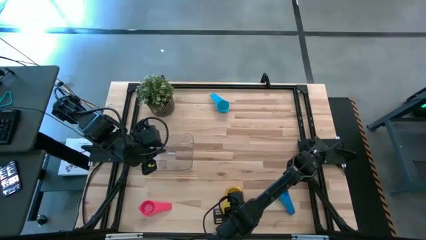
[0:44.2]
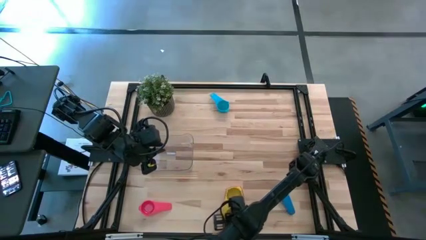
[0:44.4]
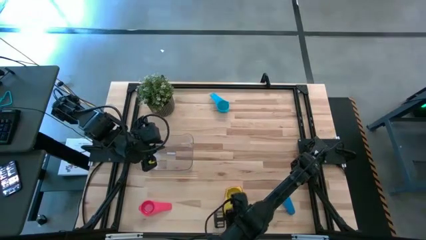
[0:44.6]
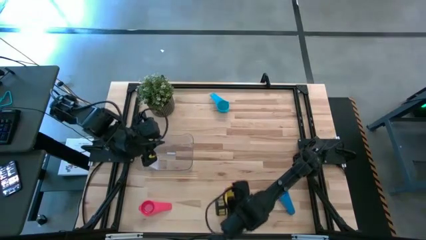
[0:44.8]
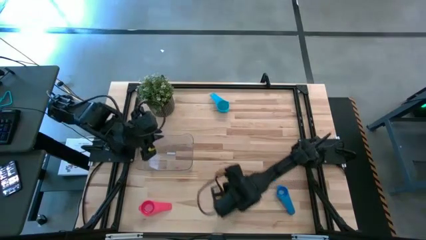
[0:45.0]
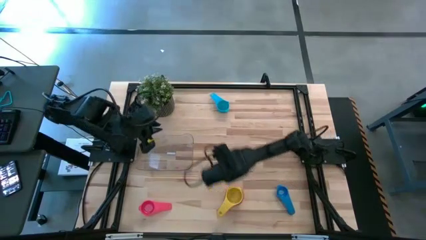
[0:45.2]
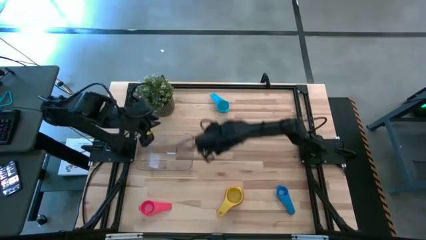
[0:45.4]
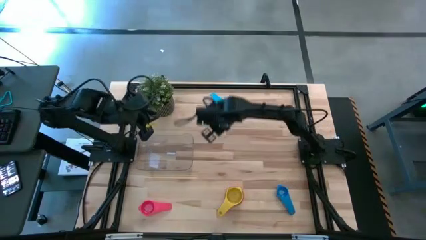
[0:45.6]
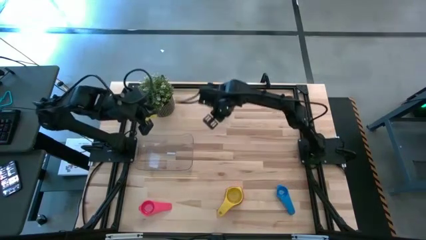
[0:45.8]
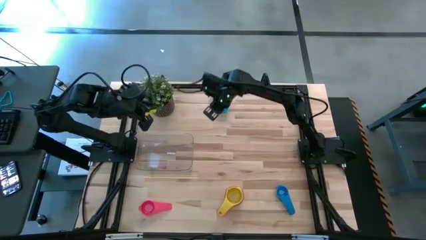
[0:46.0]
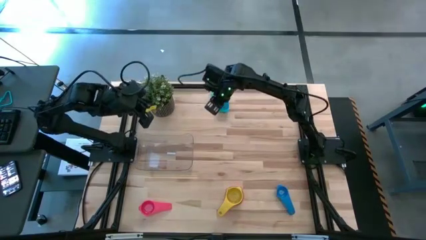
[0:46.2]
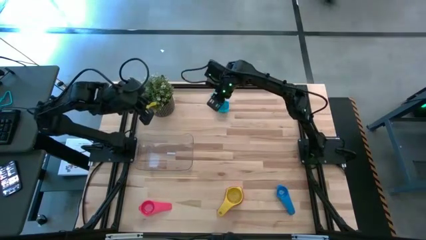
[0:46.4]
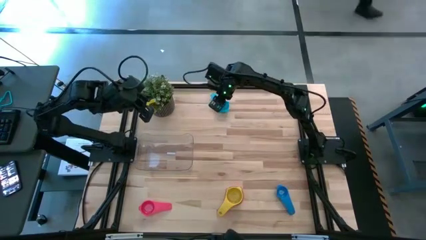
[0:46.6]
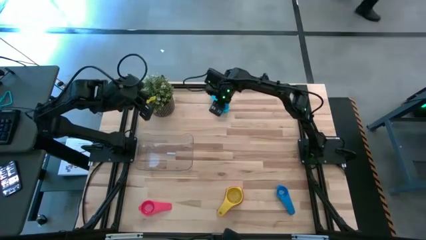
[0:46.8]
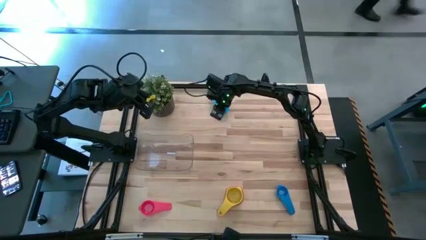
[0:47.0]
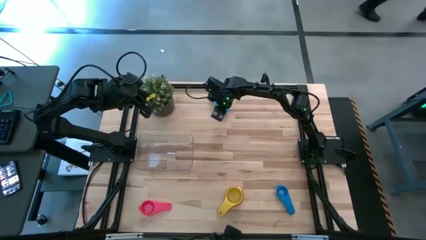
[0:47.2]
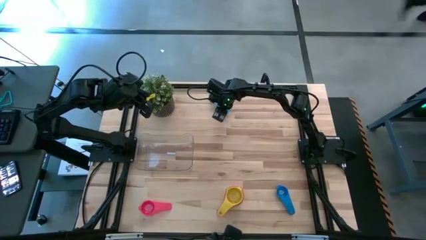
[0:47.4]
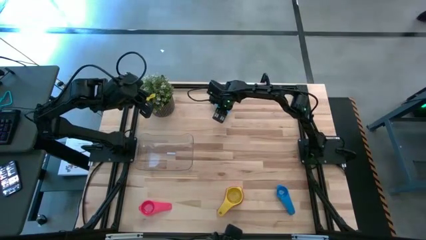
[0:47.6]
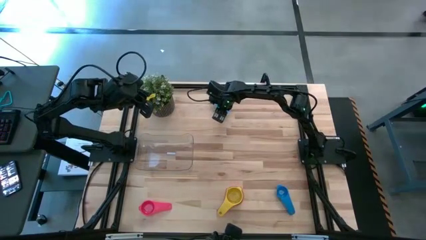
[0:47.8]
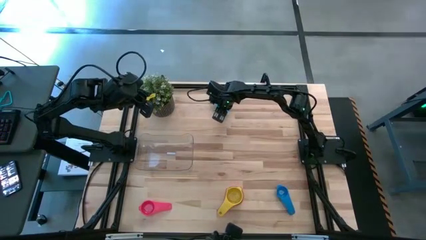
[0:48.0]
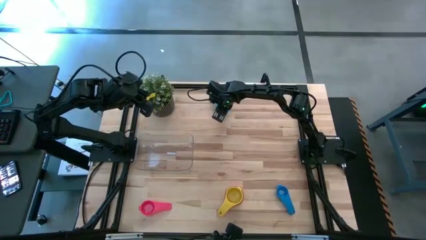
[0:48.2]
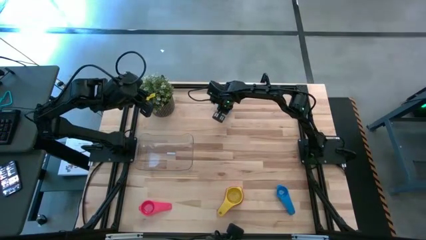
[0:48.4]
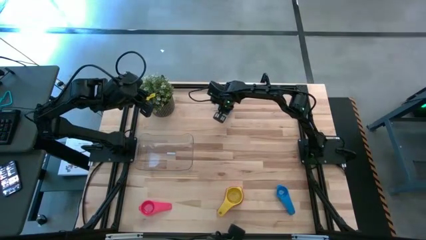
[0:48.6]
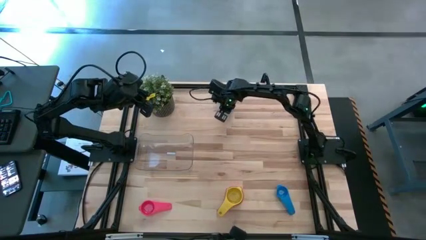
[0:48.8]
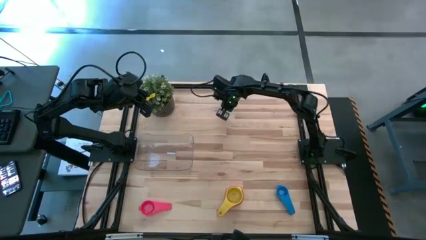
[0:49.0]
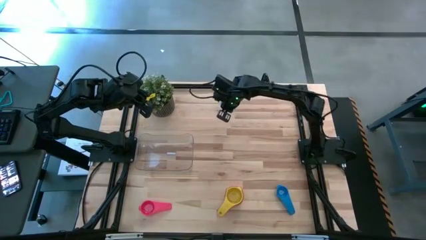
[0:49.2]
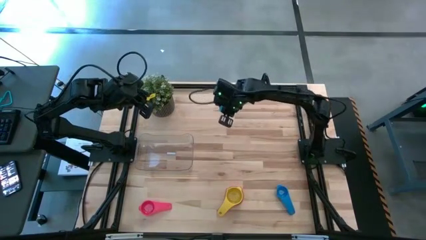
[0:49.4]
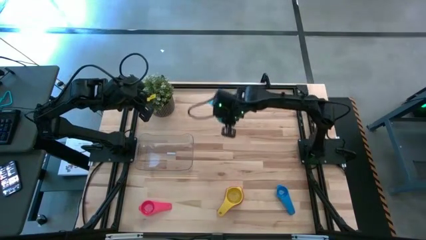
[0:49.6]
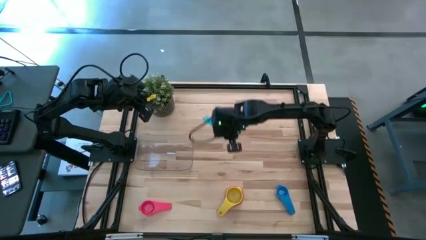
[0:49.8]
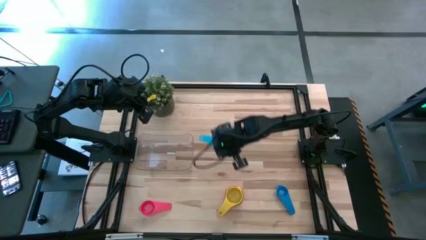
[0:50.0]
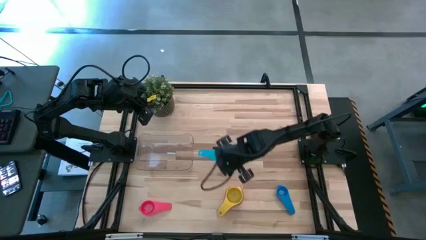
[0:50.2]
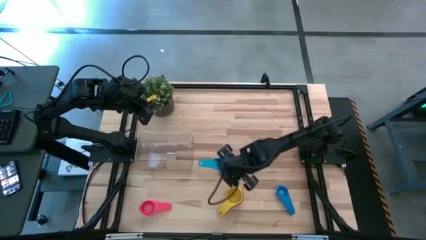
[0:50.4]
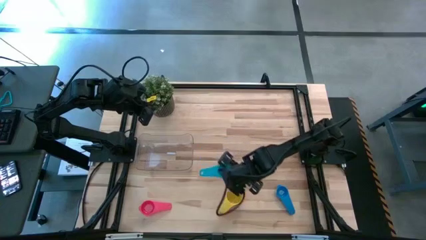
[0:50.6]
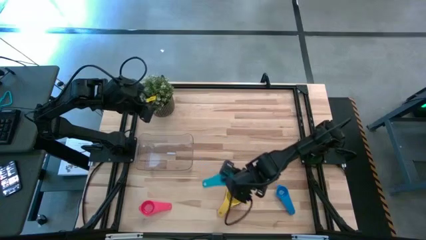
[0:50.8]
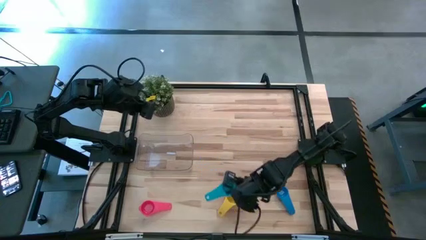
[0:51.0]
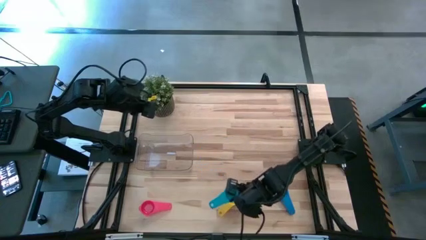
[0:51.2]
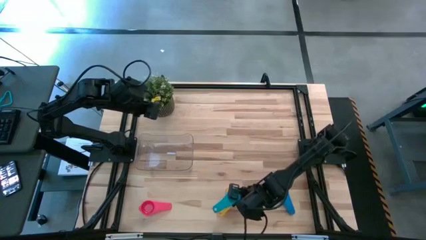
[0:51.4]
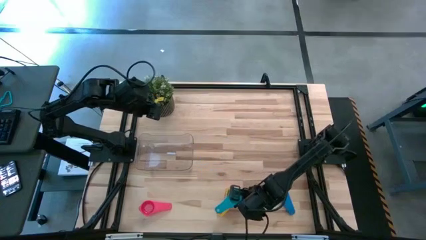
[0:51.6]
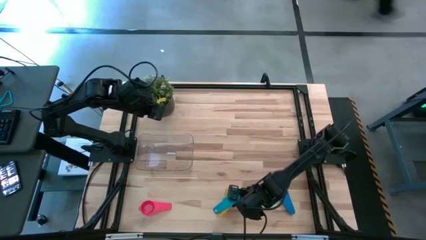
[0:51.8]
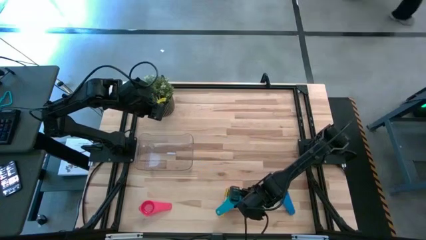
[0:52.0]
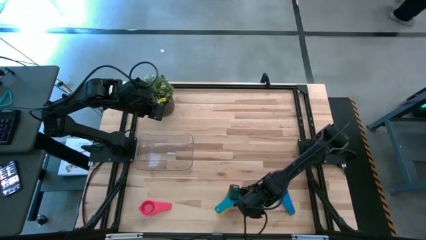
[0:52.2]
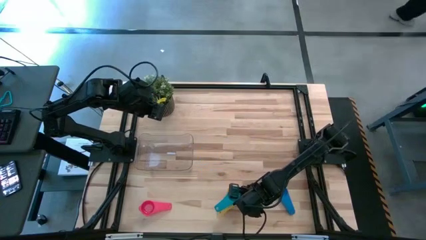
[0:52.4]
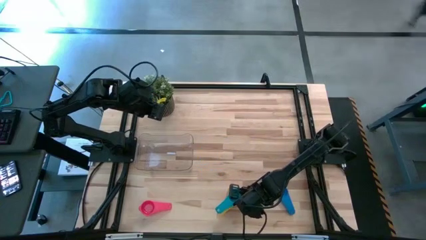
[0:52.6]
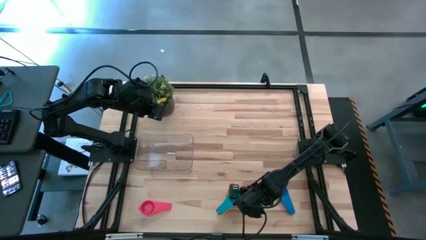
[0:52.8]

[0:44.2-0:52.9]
Task: Nest measuring cups in basket
Stack the light blue measuring cup on top of the yellow measuring cup

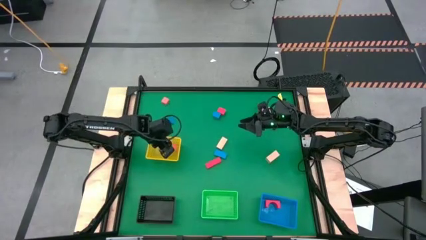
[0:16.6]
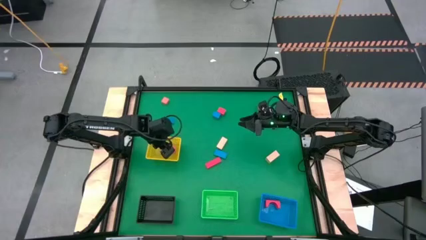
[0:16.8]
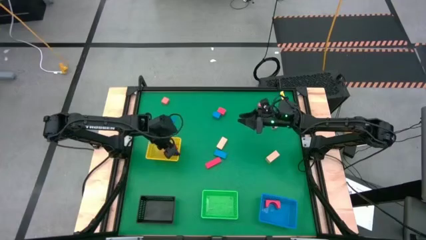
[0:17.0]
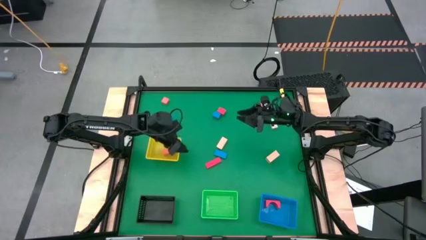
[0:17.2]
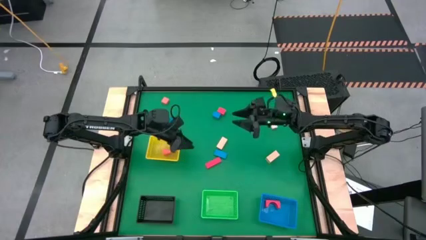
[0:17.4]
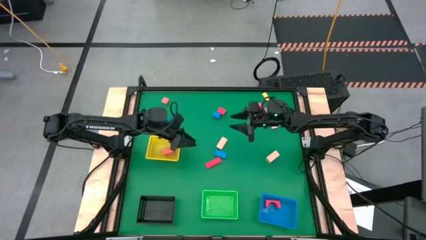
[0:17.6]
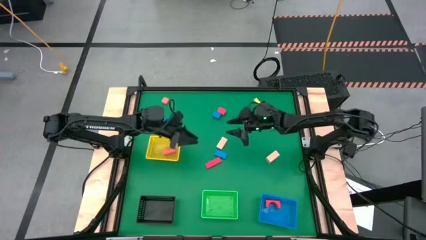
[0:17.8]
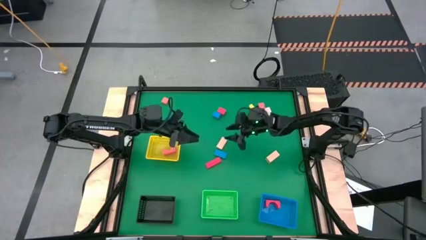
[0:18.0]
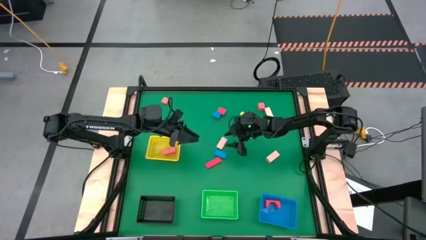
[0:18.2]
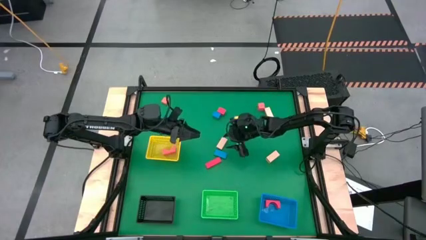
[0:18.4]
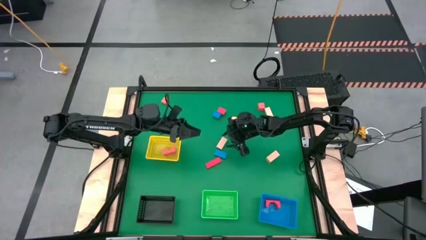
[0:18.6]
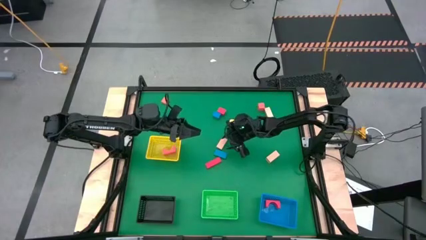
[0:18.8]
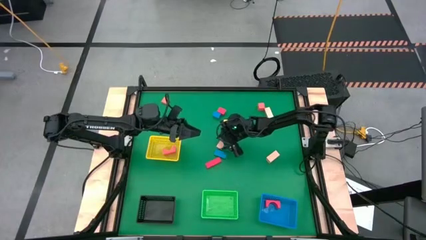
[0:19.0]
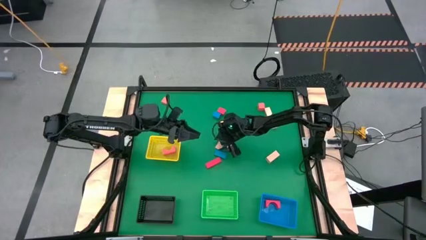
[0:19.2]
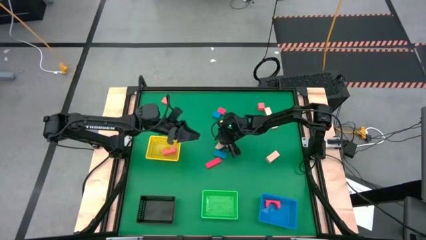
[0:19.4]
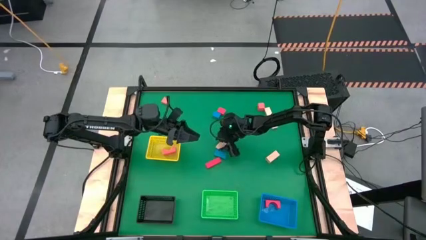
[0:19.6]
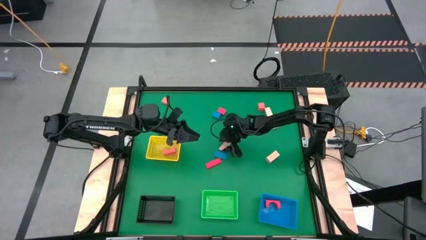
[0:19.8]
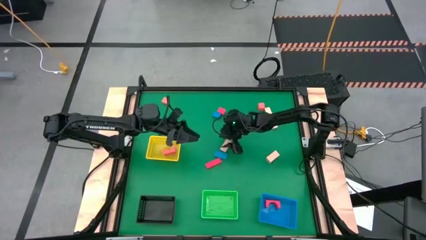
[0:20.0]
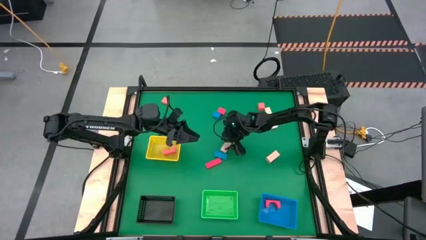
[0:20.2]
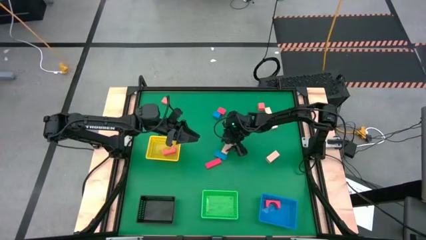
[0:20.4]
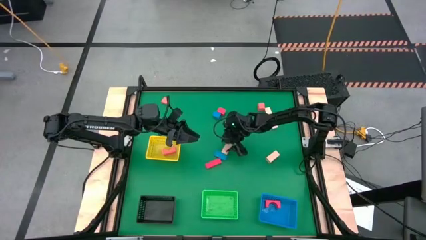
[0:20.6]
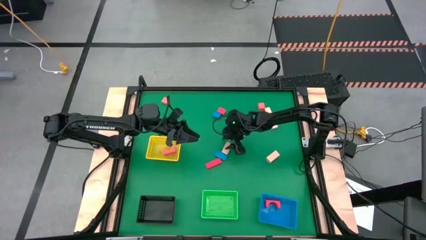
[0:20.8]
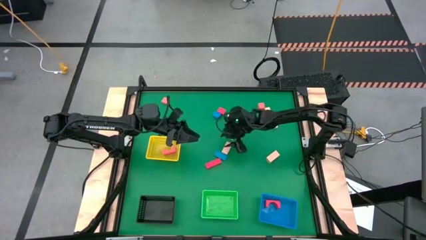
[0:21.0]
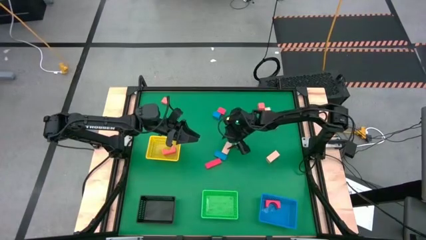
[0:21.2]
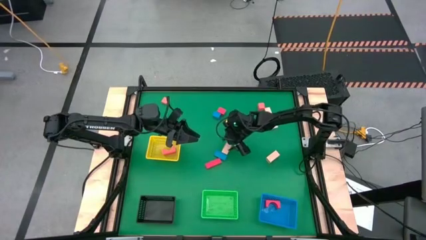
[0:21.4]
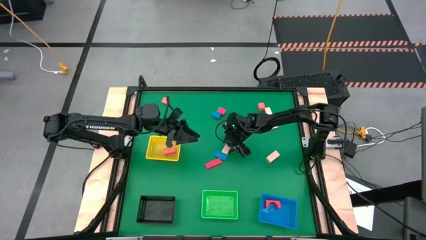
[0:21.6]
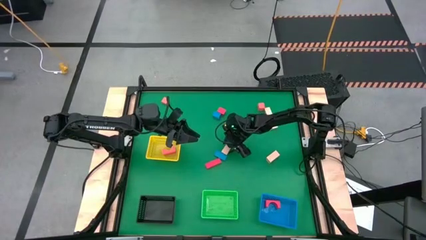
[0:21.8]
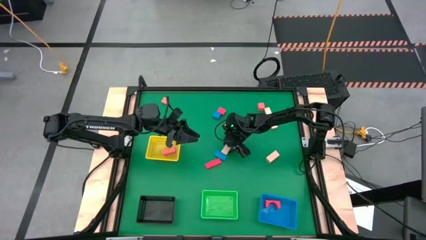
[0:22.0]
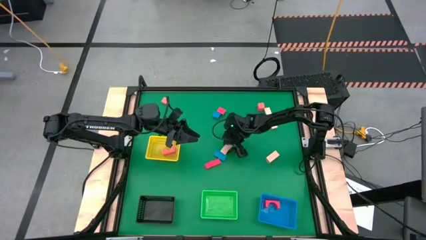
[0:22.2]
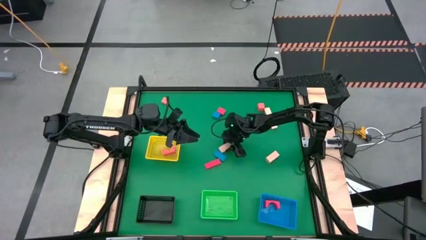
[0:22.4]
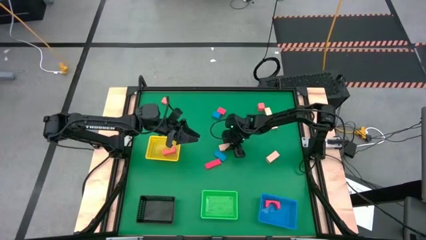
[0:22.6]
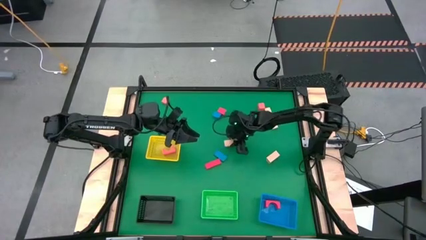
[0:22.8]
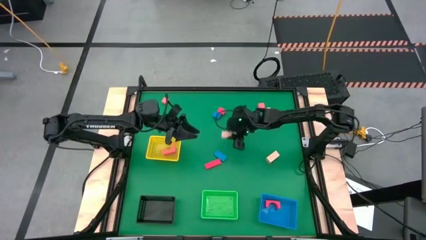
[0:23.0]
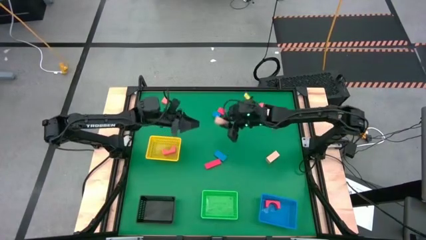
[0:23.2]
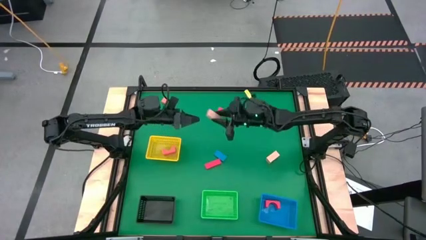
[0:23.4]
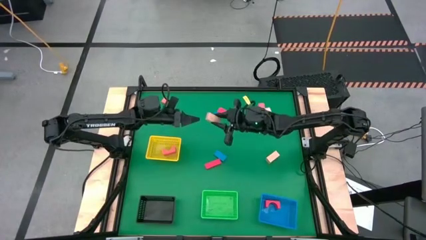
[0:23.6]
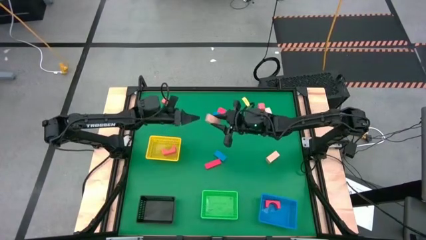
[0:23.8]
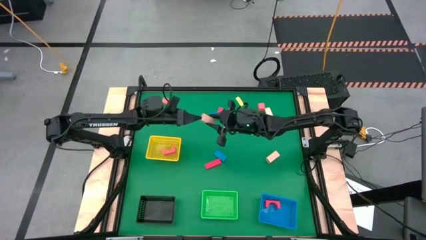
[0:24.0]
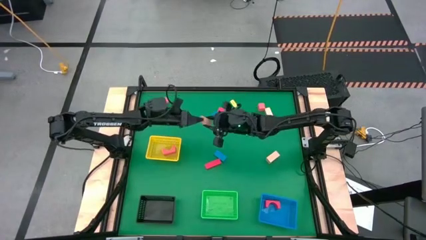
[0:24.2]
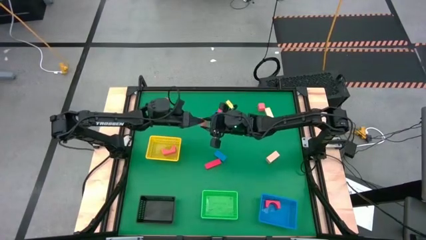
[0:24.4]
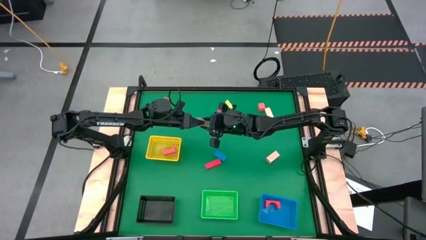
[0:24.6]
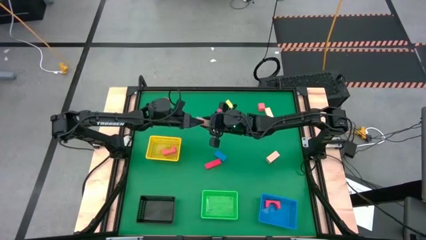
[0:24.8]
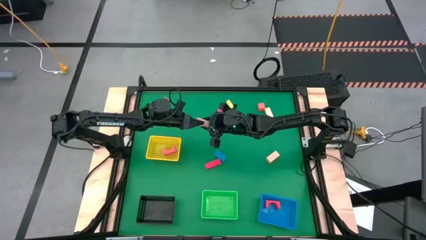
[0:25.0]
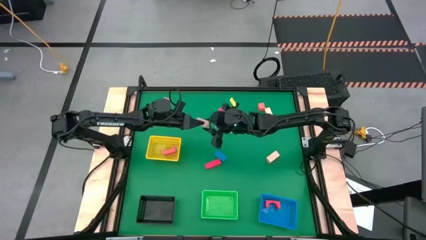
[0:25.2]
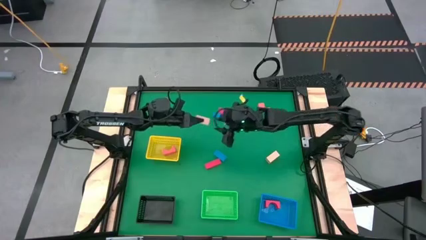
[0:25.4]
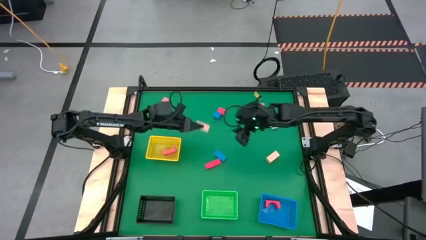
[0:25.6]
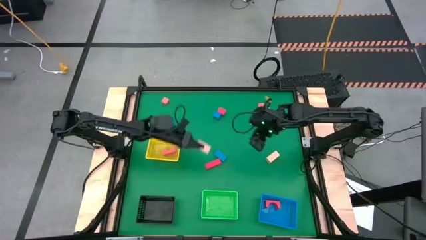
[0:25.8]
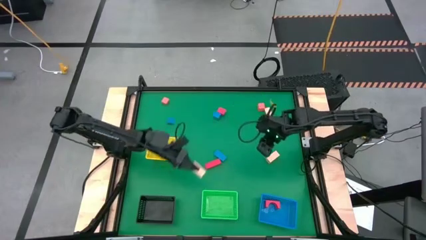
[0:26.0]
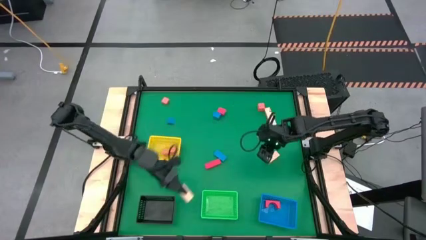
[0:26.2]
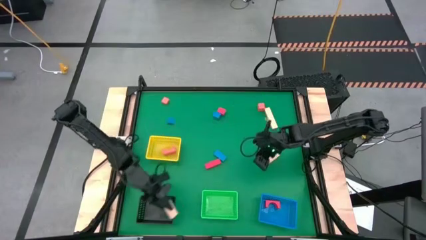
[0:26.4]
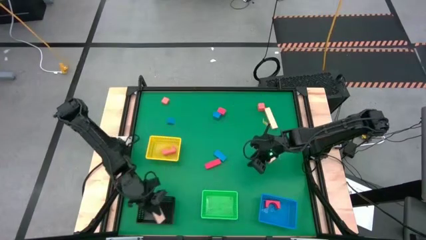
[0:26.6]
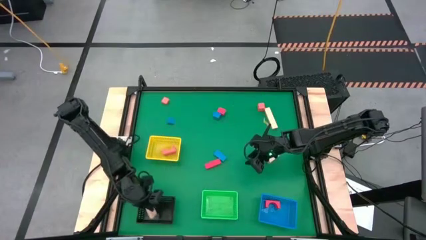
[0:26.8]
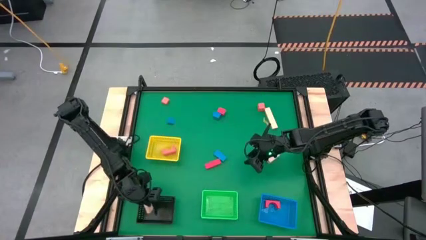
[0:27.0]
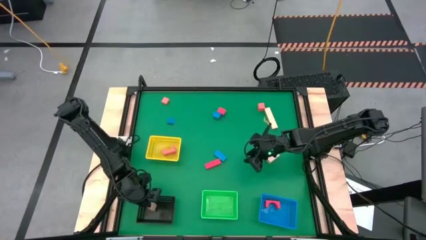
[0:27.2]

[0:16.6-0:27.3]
Task: Sort & place blocks by color
Put the small white rectangular block into the black bin
